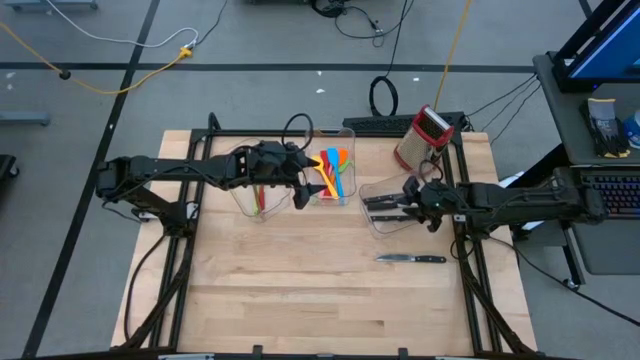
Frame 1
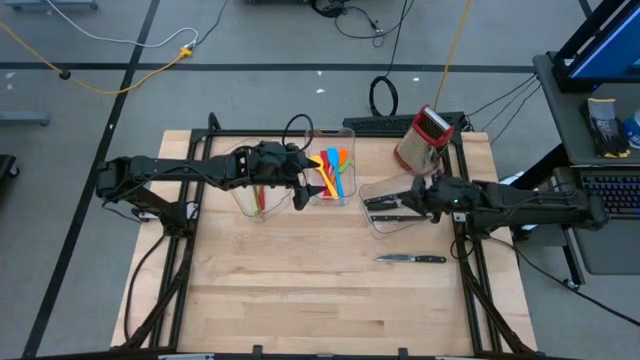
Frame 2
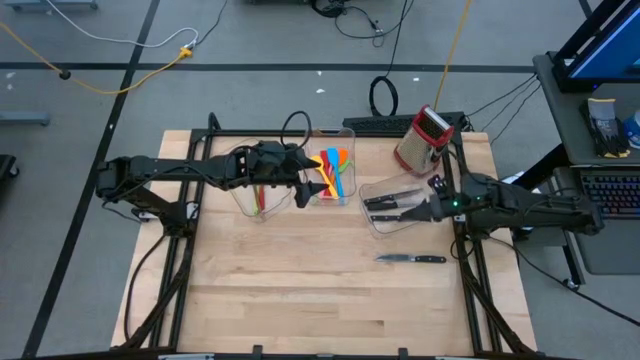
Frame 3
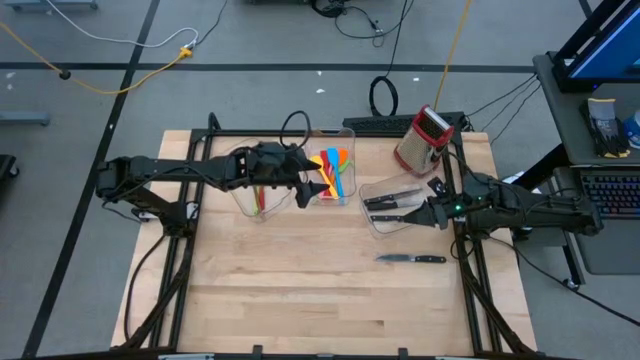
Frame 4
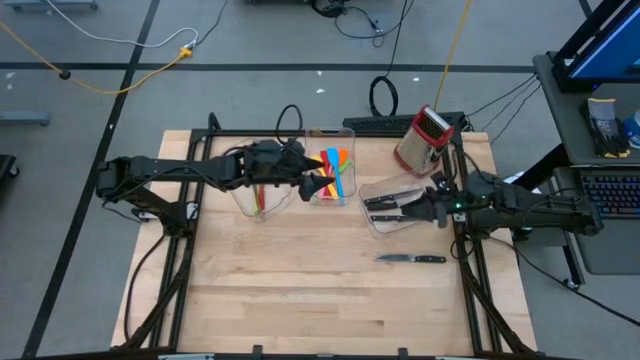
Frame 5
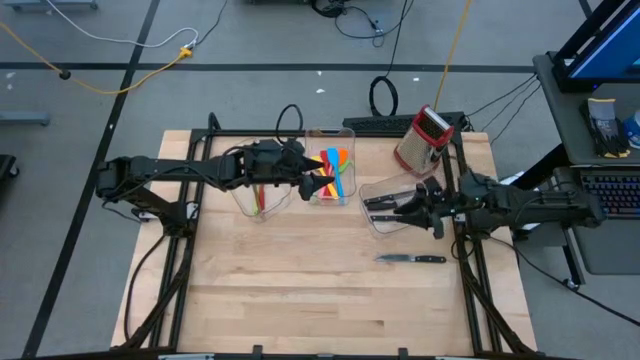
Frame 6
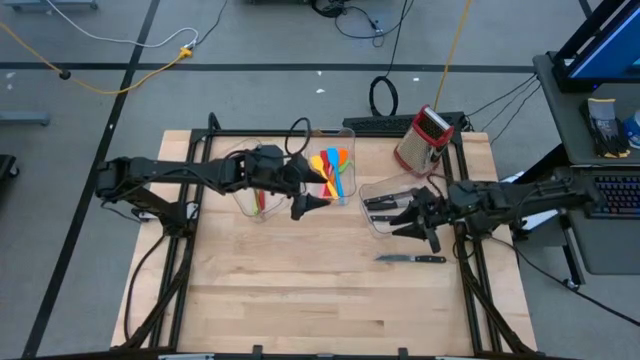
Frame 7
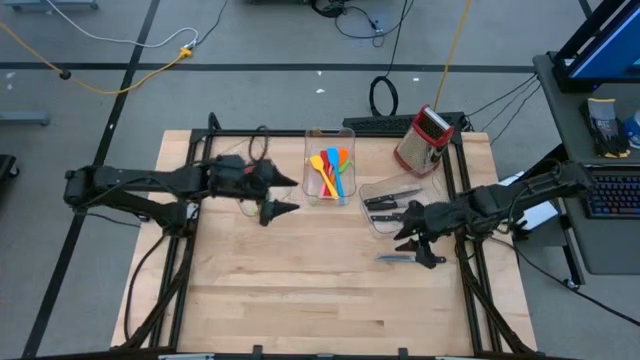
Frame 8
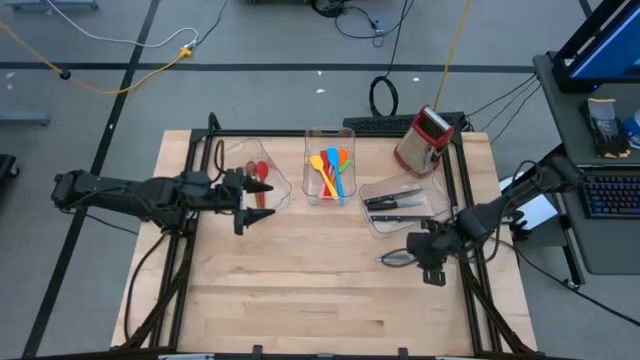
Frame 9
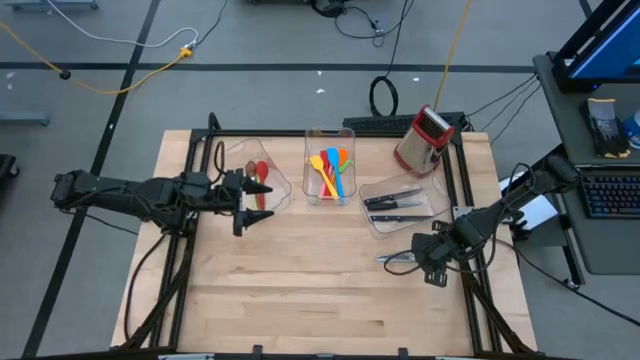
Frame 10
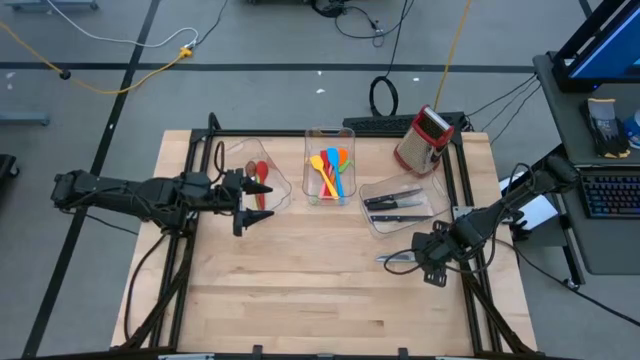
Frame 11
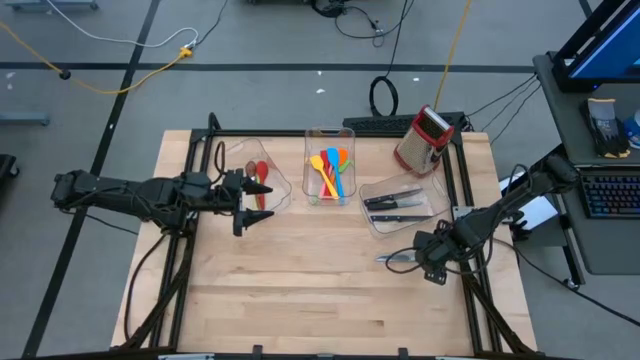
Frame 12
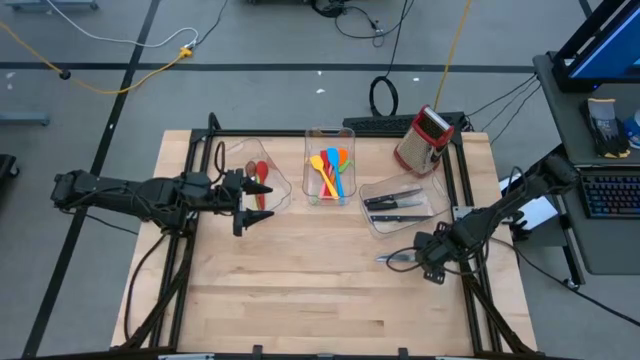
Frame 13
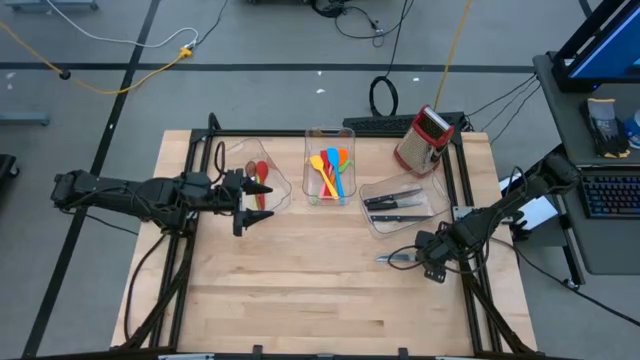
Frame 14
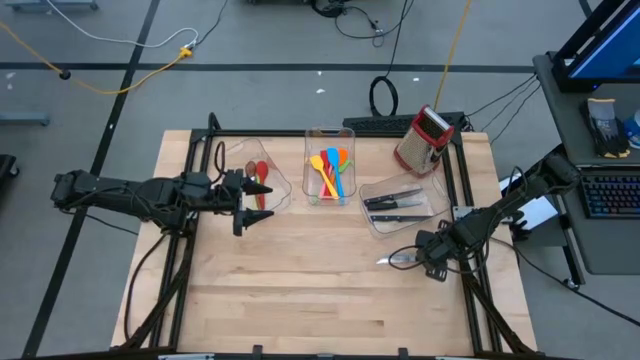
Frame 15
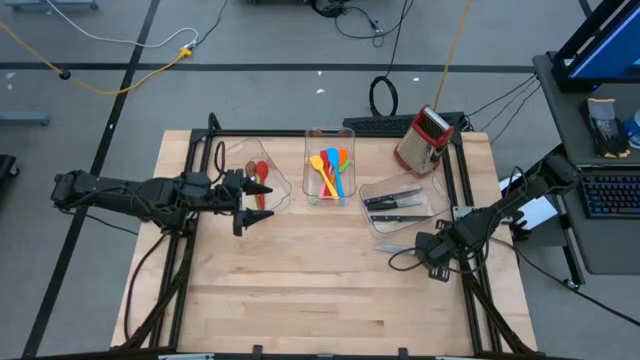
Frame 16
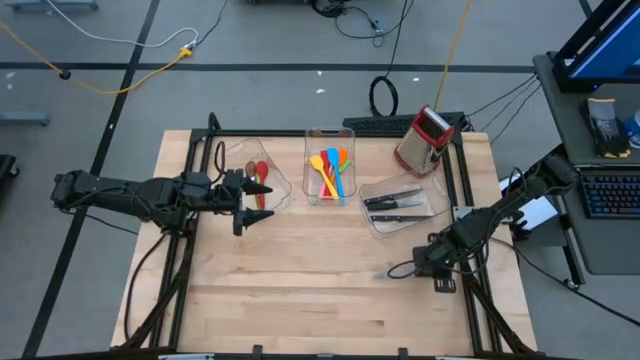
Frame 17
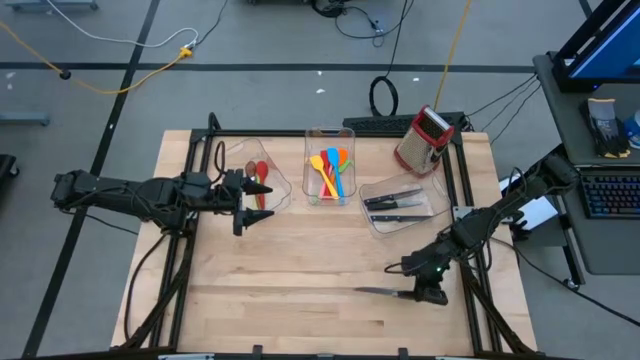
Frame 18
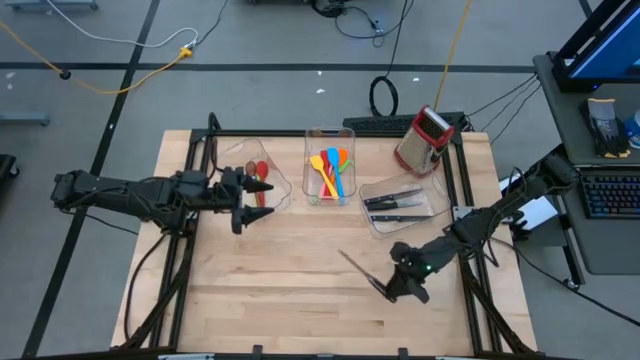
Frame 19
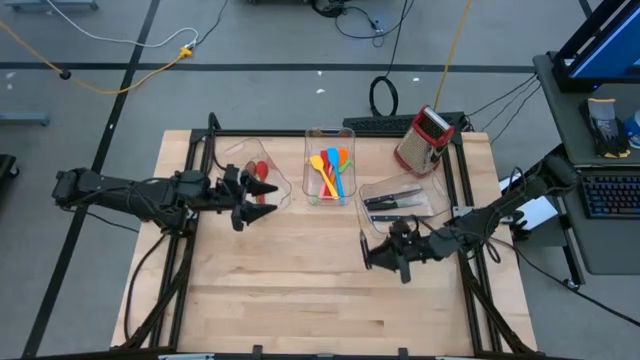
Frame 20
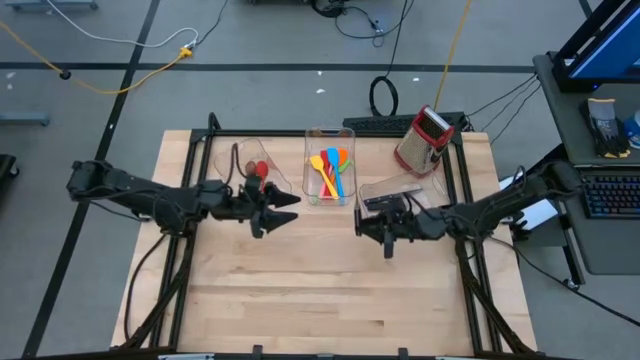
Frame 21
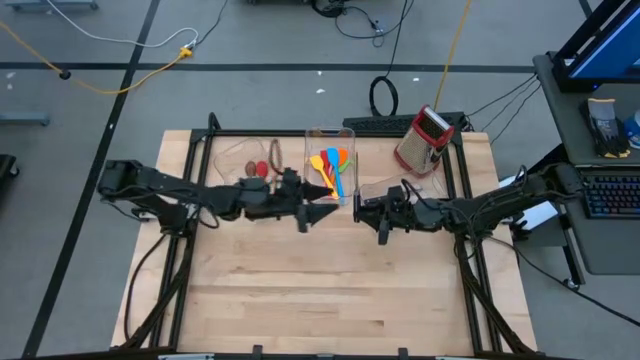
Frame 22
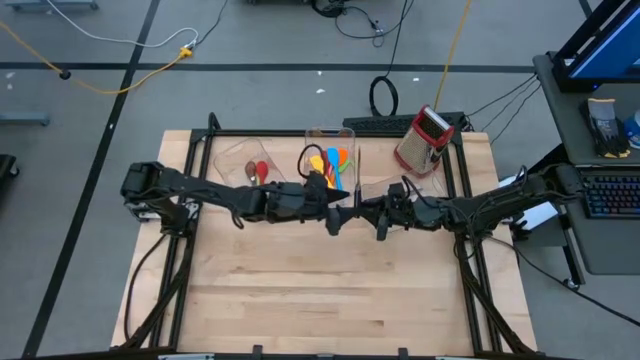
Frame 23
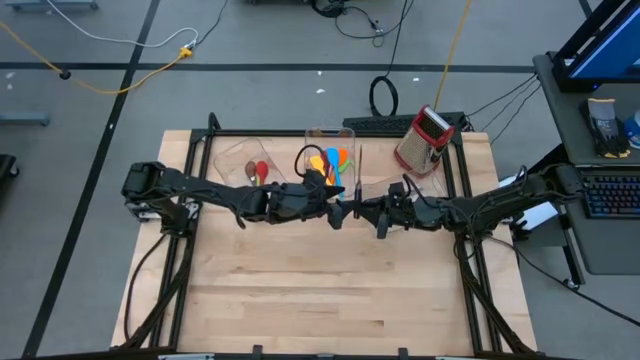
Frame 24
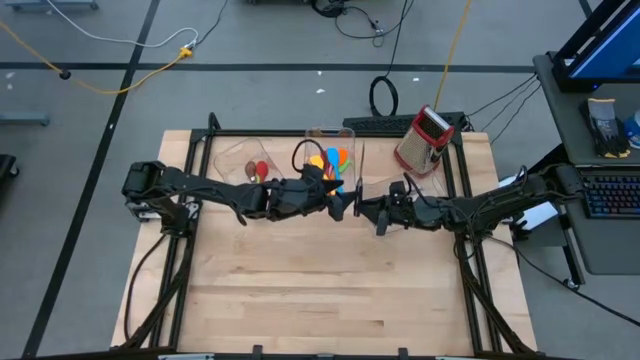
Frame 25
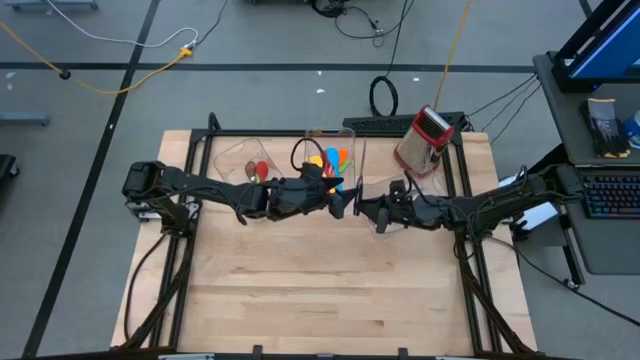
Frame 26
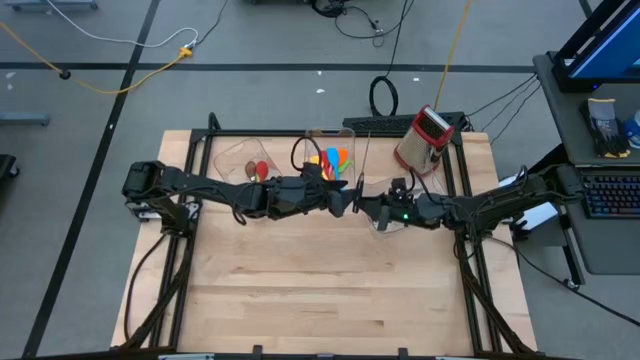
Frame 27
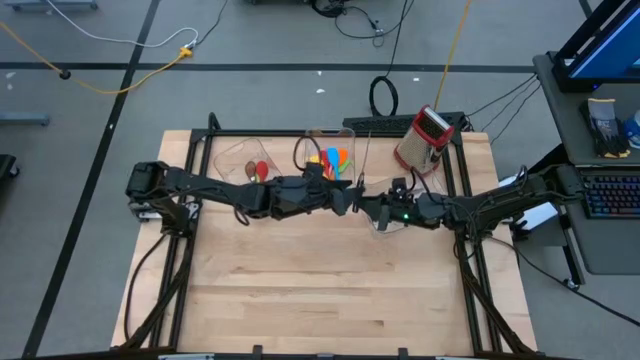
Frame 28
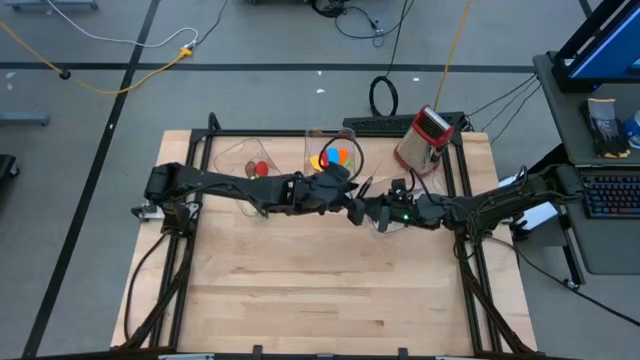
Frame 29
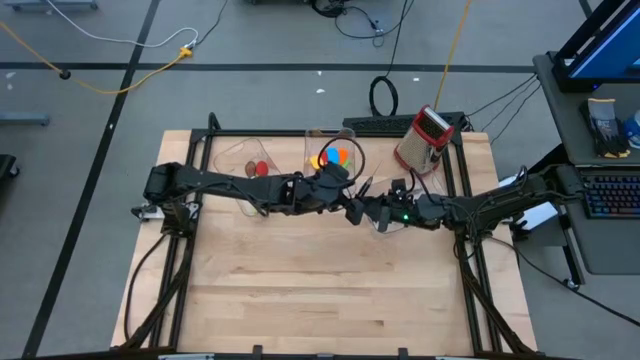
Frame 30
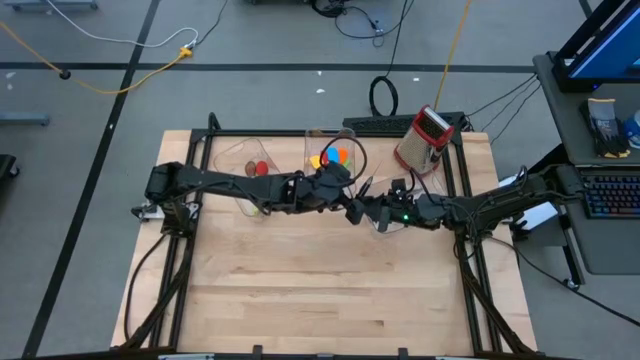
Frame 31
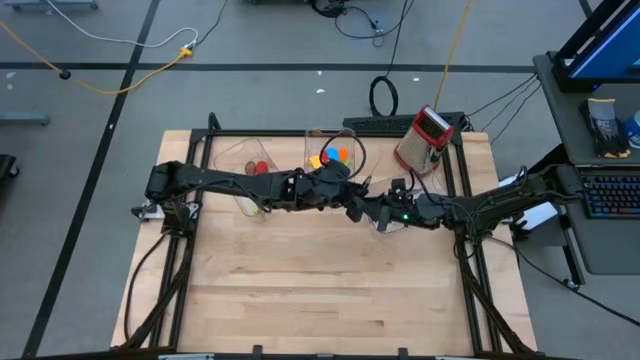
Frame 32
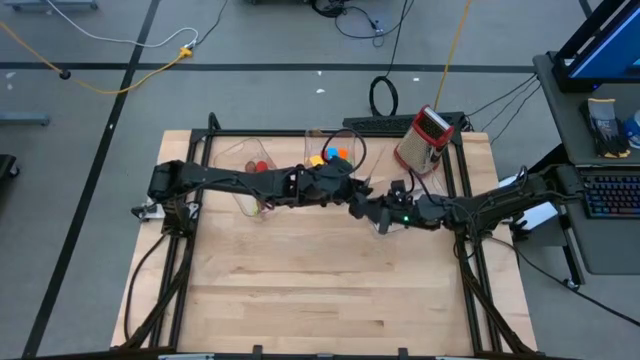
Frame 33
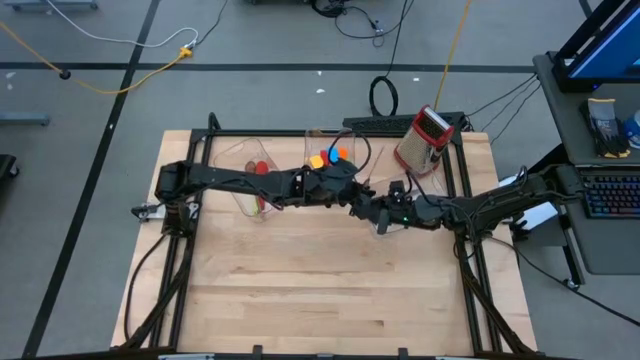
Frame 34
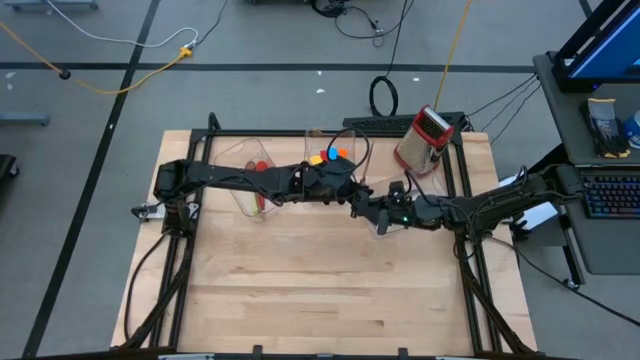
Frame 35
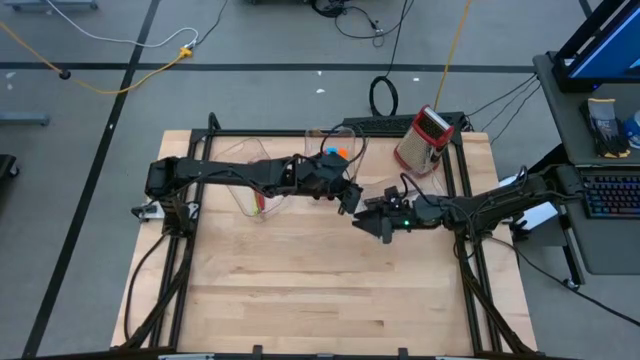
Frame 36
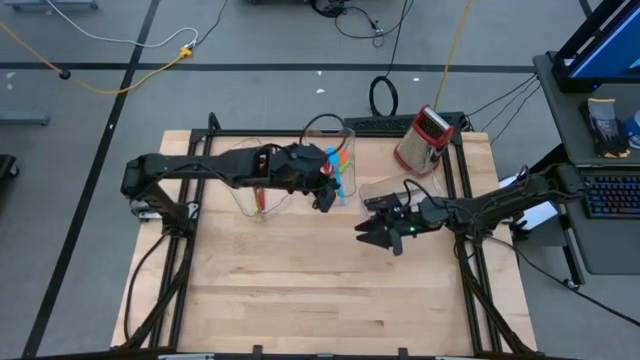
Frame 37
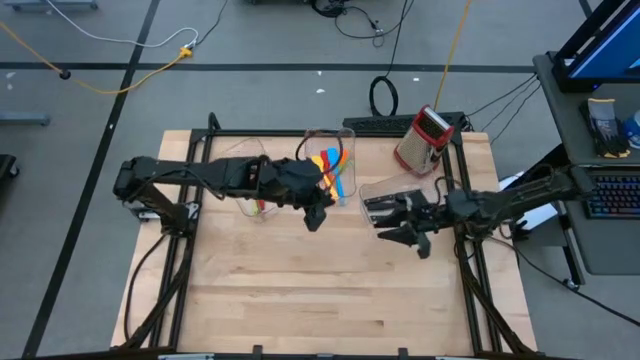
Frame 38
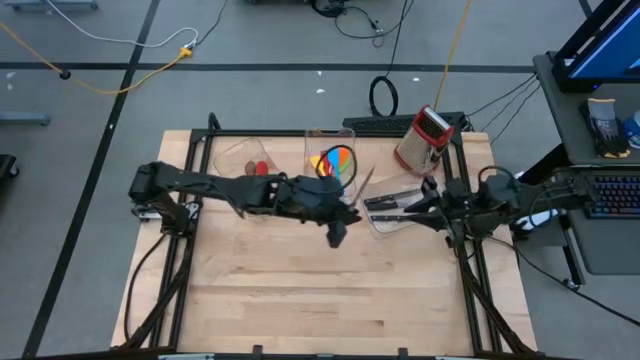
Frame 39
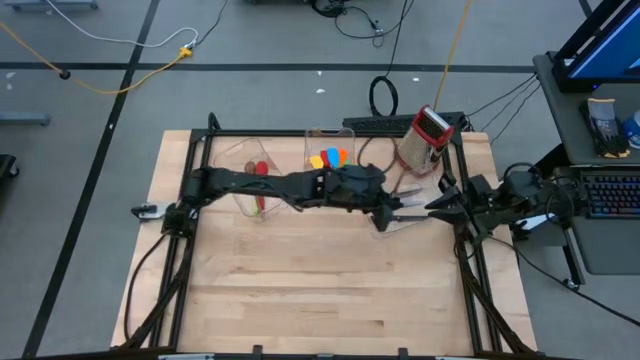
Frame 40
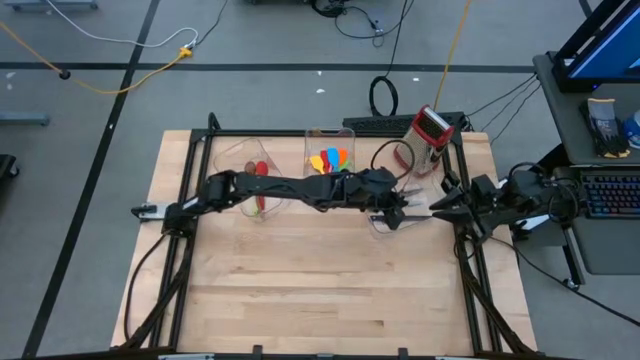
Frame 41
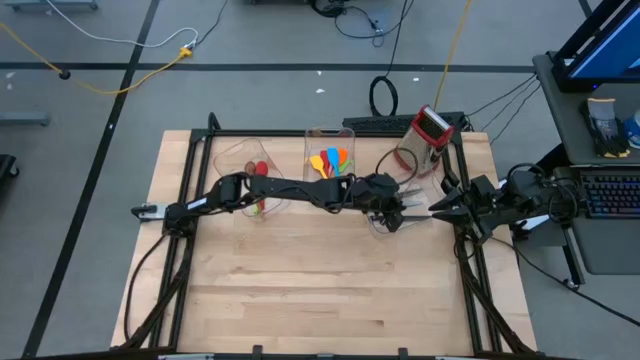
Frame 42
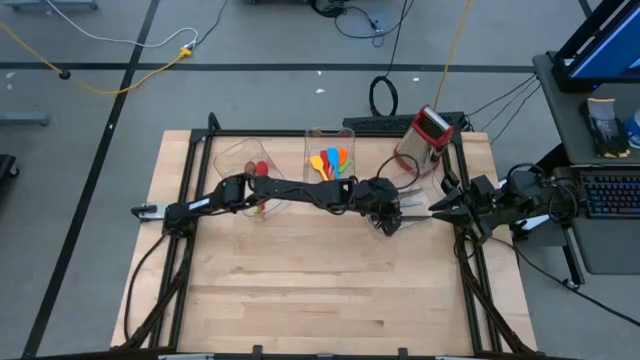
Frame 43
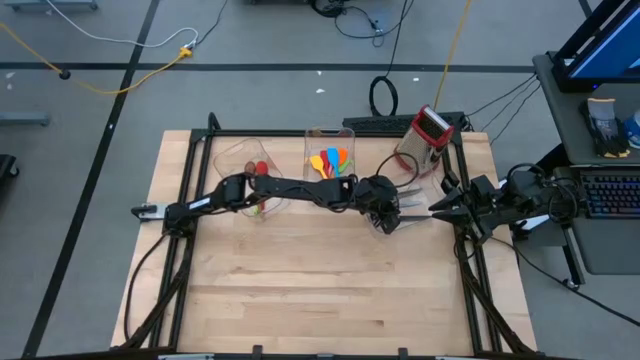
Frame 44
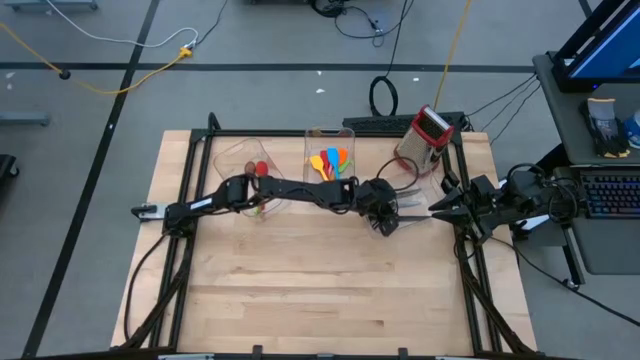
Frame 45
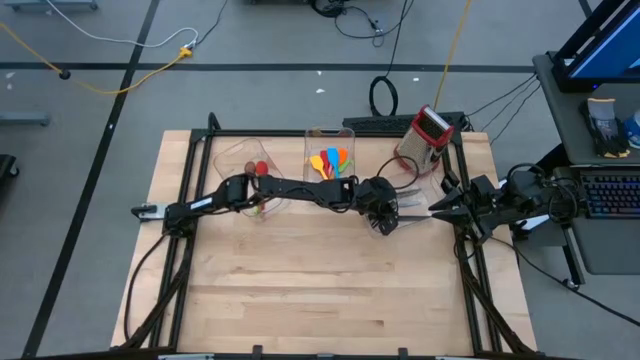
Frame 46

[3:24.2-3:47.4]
Task: Pick & Place Kitchen Items
Put the black kitchen knife into the right bin
